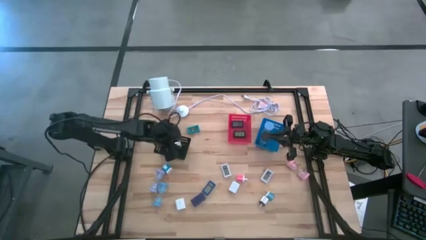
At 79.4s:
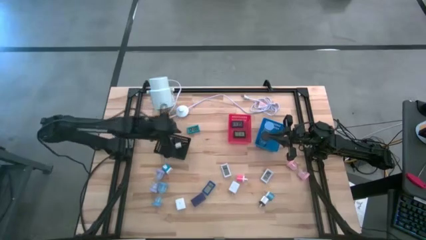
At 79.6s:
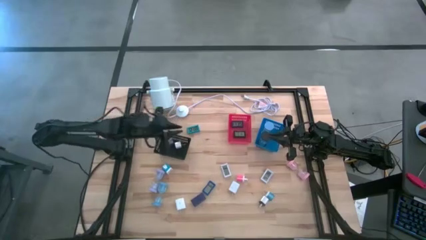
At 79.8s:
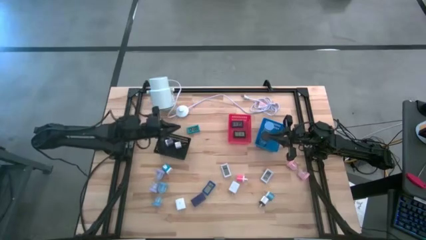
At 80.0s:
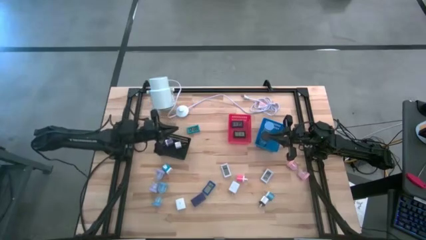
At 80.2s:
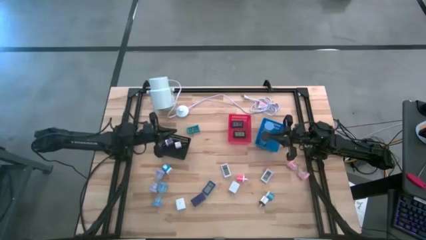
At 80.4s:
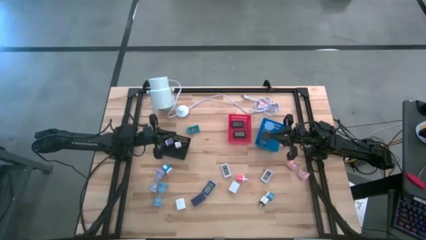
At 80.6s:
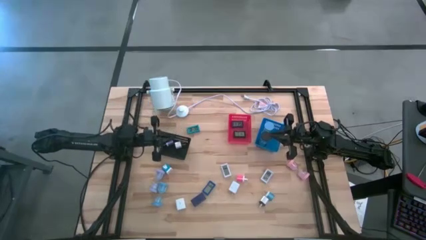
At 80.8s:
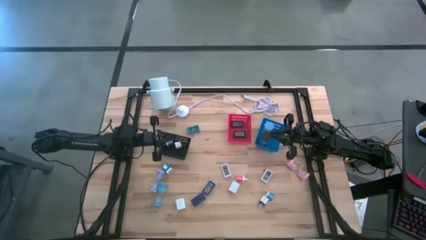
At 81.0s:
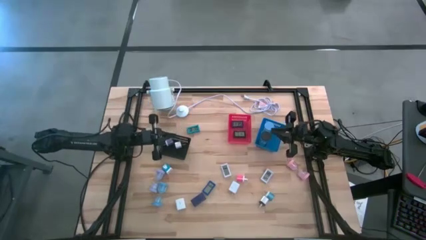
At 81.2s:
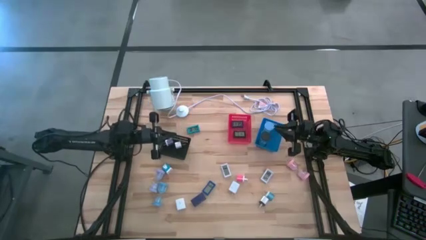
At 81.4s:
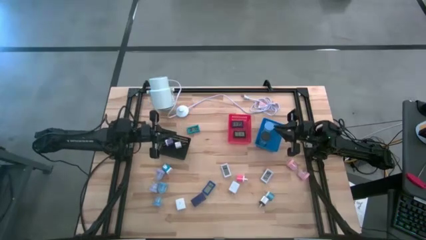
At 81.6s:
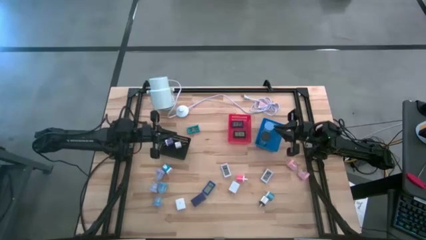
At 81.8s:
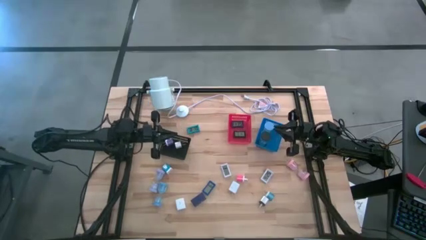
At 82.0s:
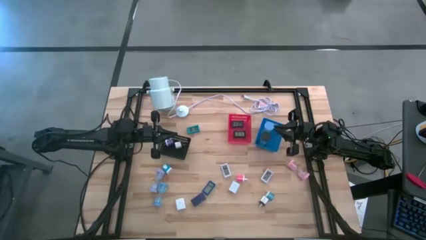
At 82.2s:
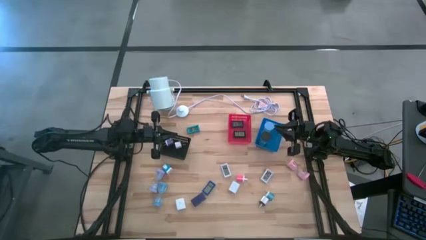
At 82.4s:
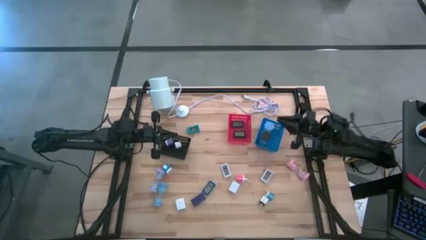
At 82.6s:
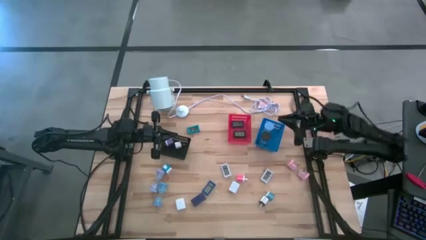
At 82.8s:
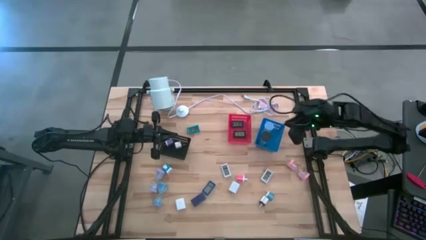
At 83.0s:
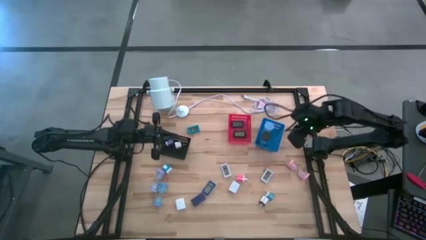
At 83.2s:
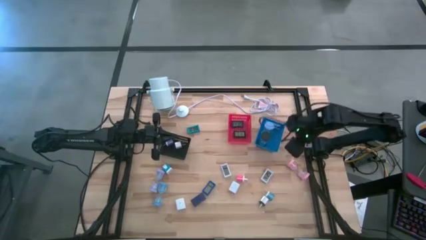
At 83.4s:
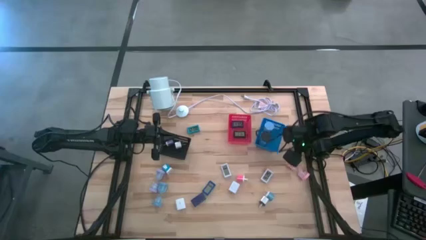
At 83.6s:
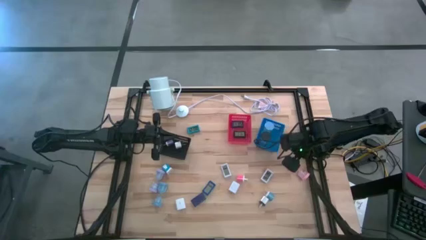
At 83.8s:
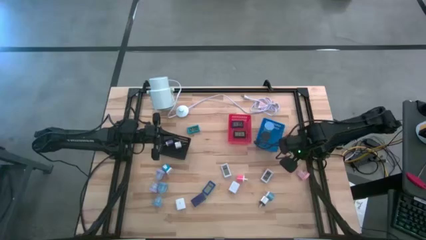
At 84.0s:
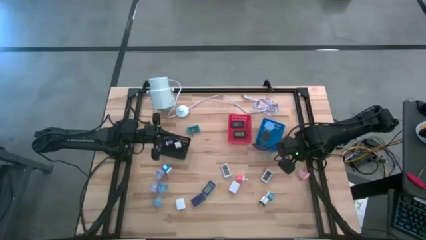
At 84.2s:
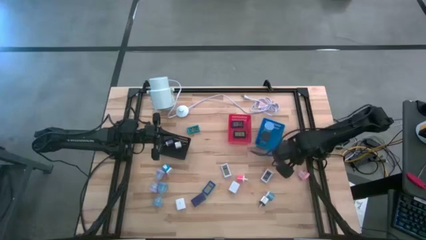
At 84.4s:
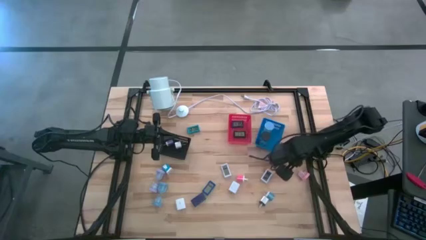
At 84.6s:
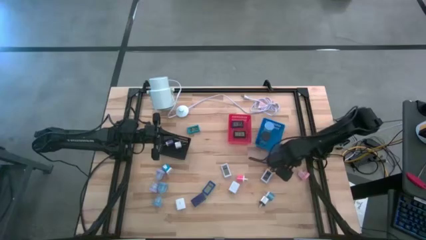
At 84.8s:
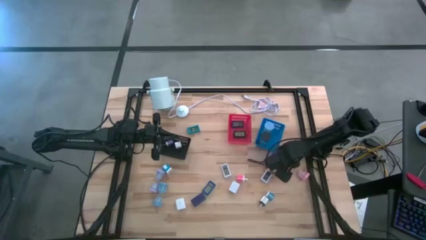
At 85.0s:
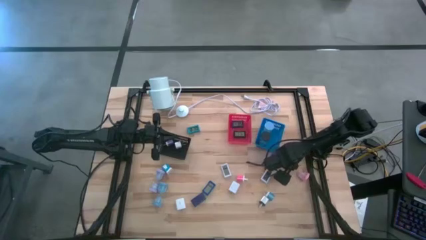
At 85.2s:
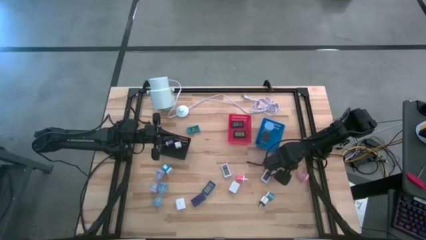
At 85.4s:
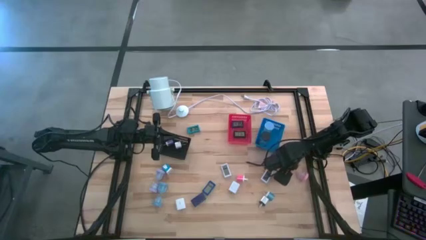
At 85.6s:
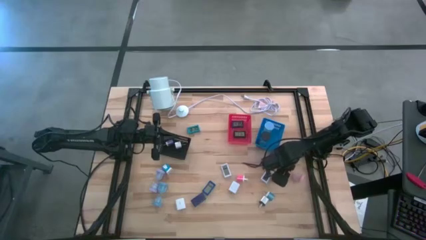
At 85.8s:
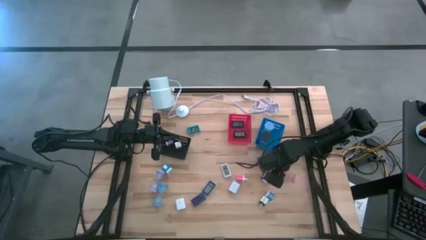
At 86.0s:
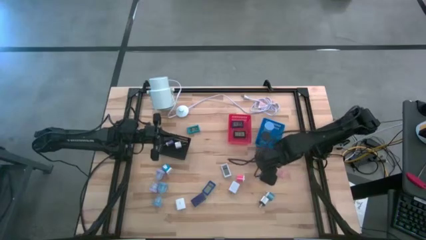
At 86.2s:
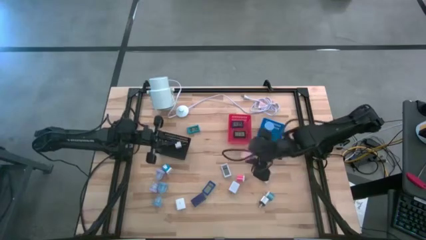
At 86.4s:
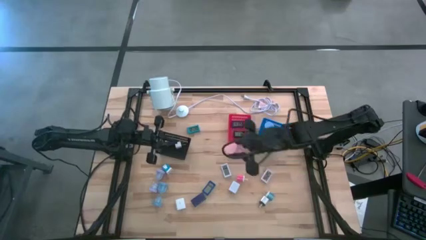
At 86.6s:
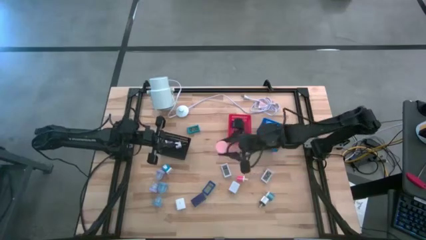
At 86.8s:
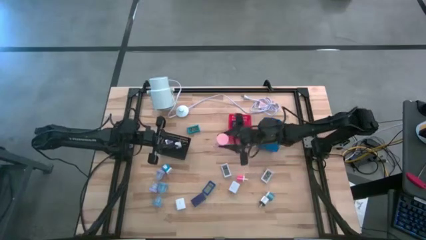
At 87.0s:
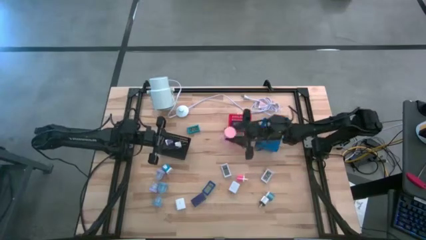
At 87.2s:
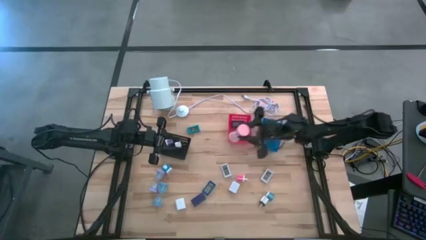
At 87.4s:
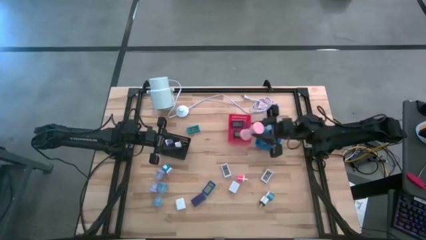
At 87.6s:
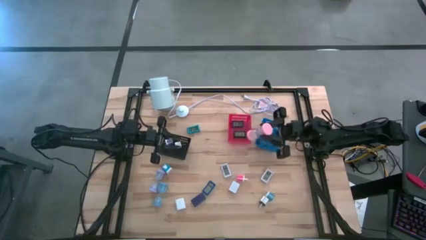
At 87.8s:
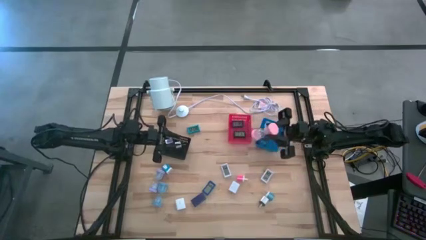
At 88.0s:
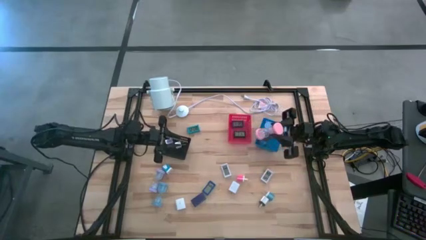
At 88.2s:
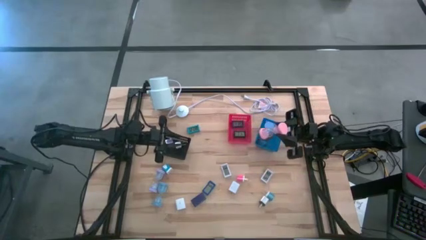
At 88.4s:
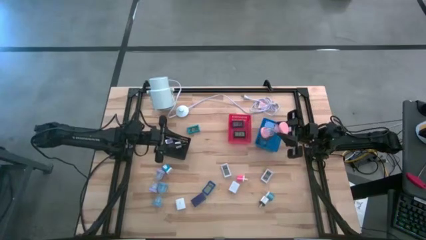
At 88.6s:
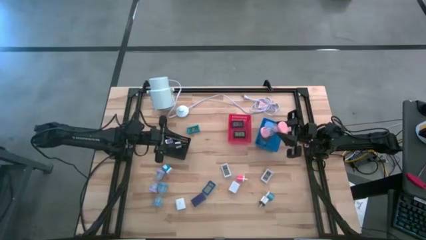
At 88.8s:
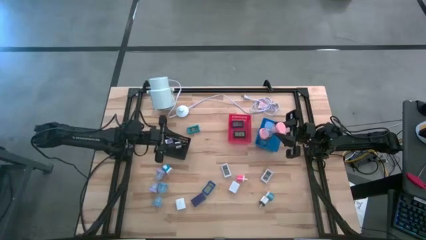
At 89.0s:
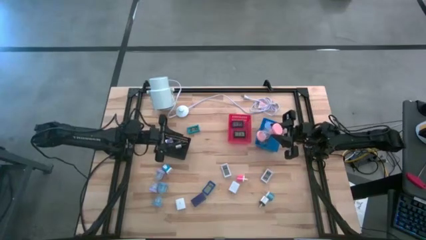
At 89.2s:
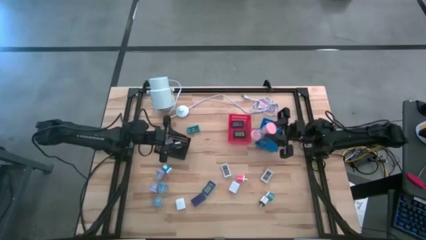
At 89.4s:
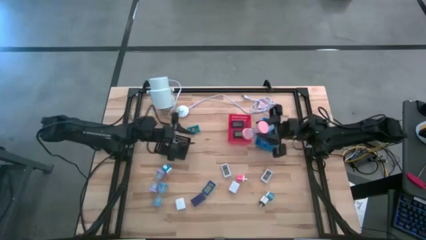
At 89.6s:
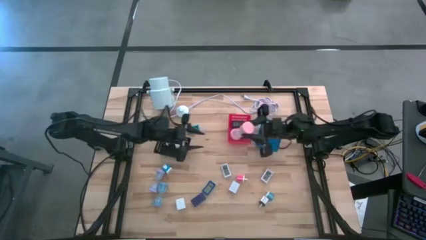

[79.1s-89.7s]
Task: Pick & Place Office items
Put the pink hourglass into the blue bin

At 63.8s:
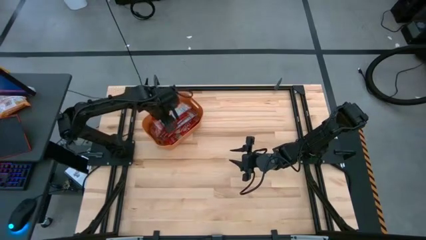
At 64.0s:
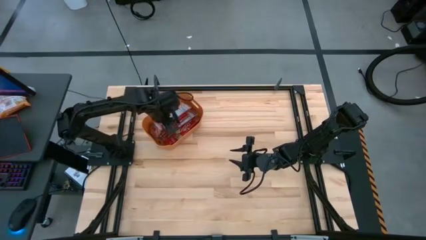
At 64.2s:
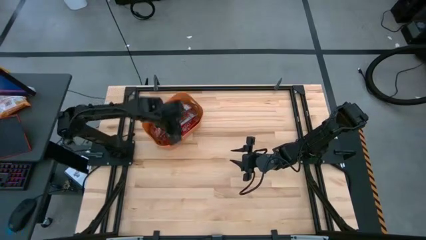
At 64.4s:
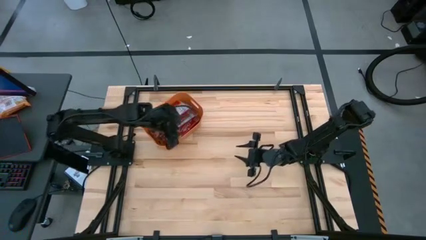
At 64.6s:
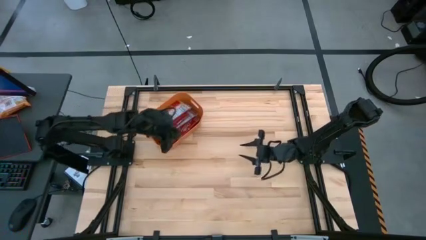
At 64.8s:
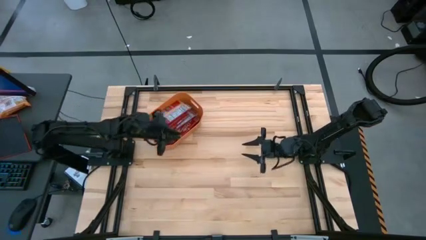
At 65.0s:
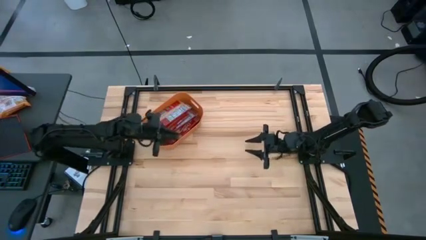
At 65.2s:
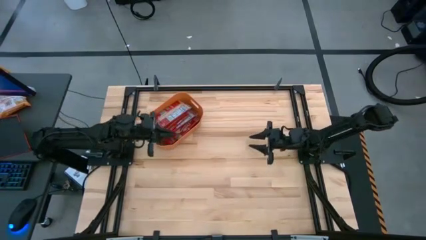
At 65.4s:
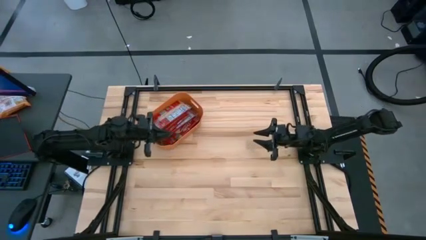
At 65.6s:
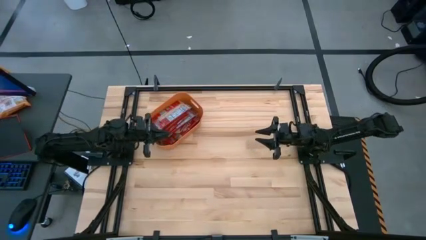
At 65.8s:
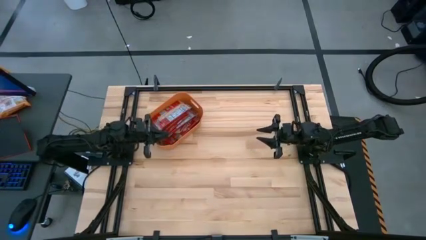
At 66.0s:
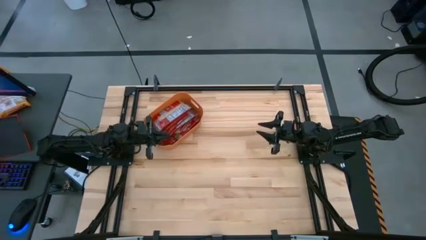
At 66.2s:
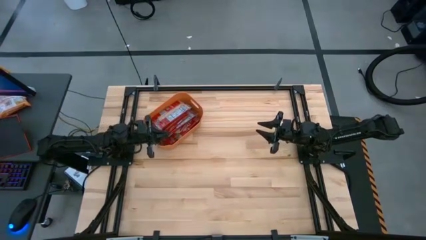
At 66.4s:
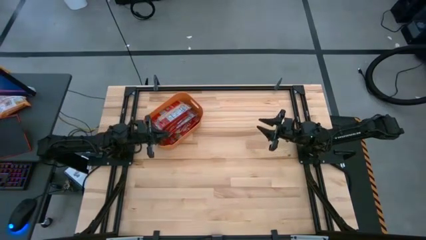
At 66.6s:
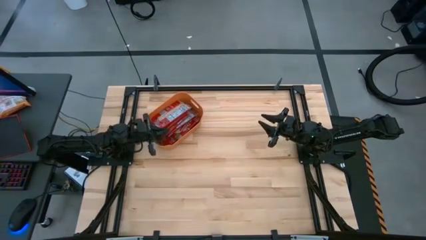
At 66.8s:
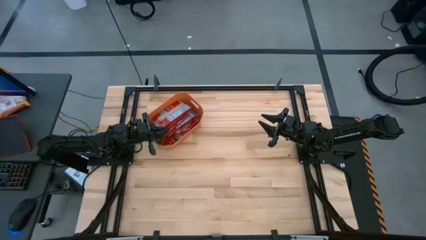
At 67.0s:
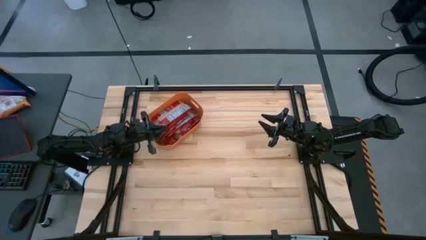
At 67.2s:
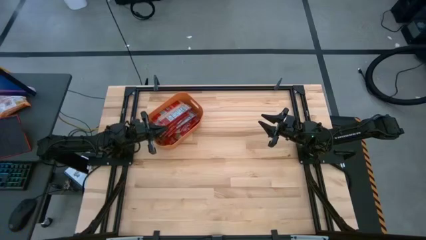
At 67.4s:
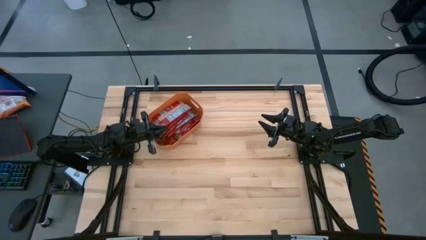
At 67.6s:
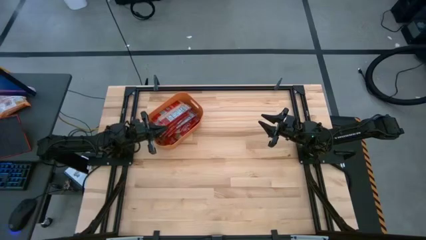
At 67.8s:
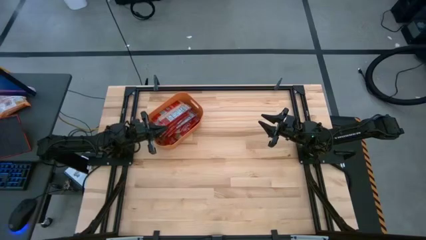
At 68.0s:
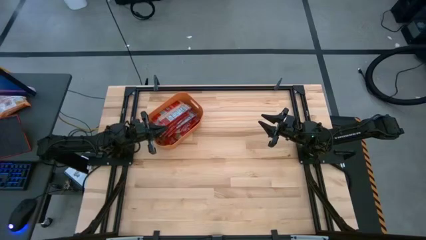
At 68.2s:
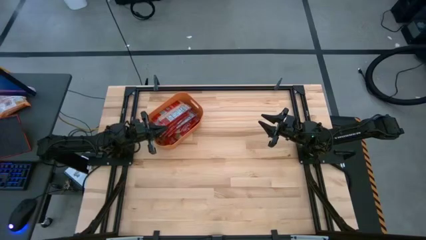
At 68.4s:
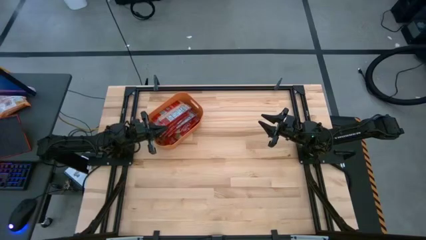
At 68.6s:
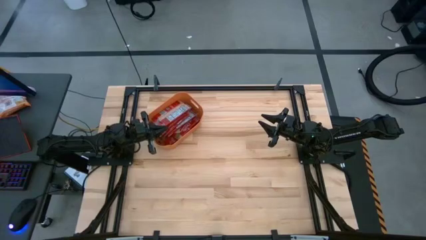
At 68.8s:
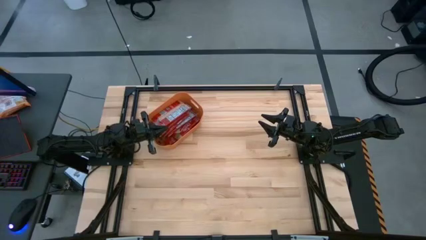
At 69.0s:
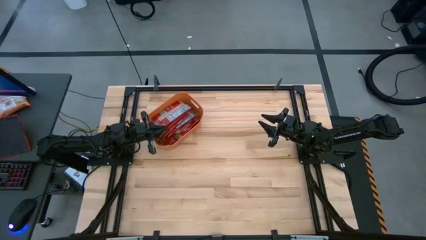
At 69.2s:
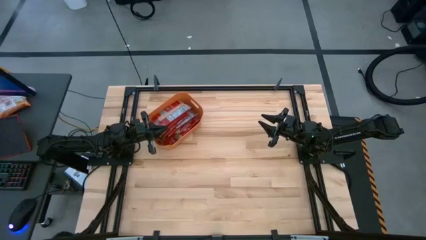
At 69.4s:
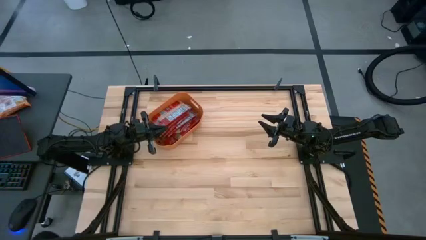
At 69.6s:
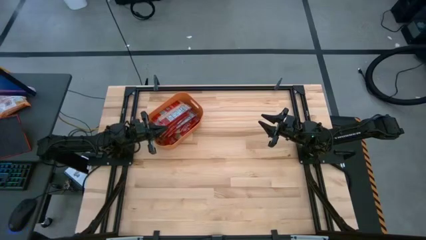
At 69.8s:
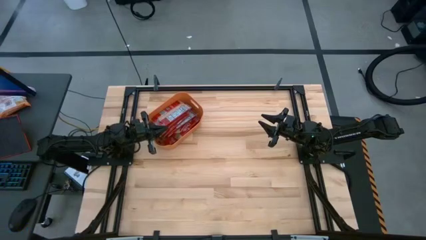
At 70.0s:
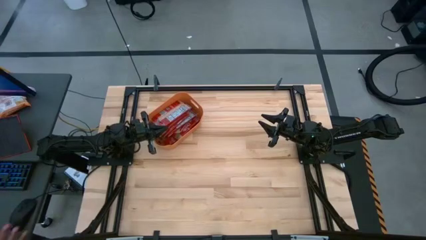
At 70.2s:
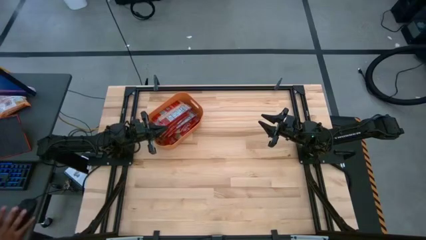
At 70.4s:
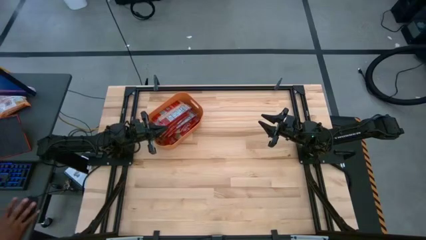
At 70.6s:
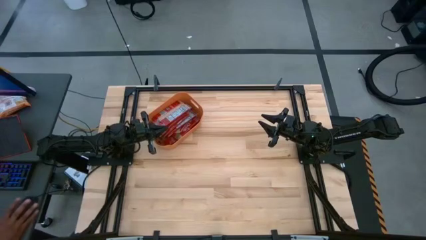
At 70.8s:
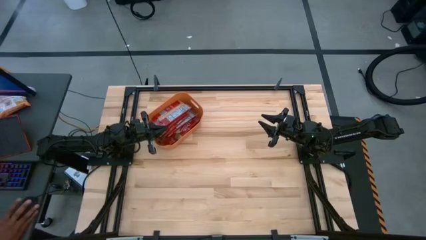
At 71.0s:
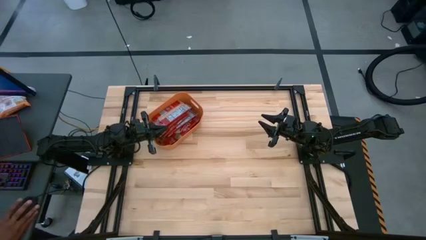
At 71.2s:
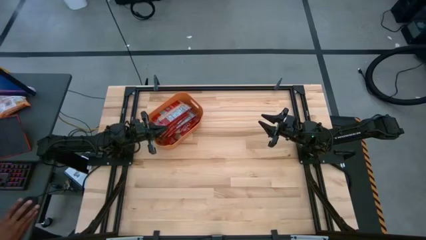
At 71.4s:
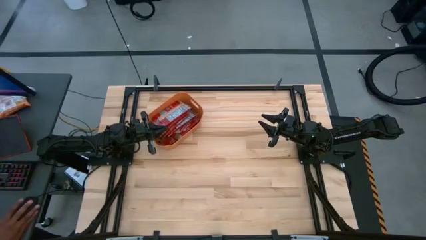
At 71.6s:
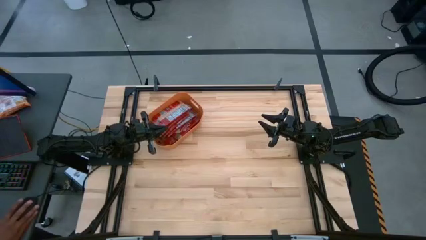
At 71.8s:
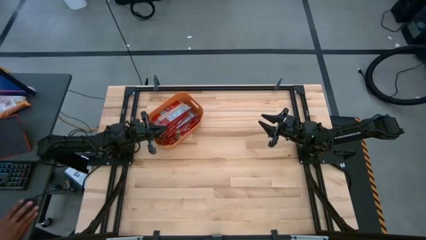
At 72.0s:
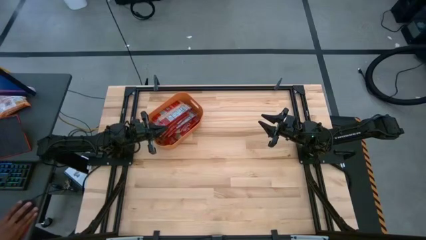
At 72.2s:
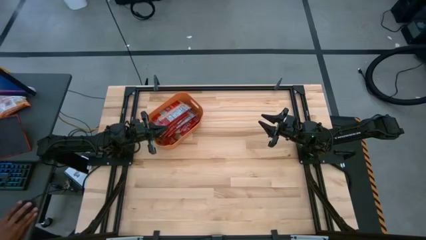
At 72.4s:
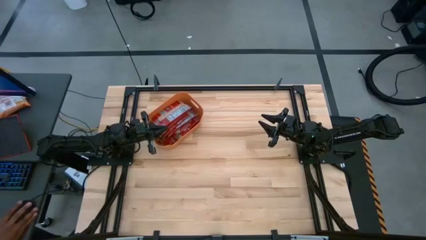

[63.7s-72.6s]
Task: Sort popcorn bags into baskets
Return to Home Position
